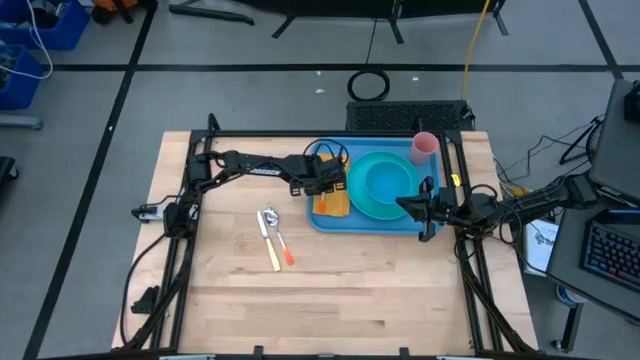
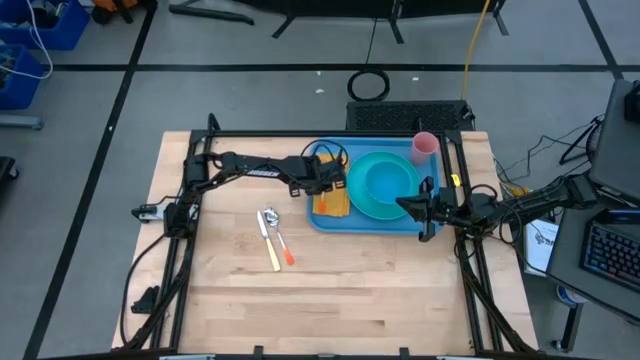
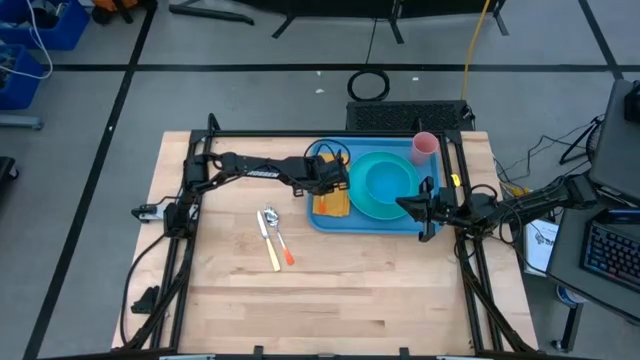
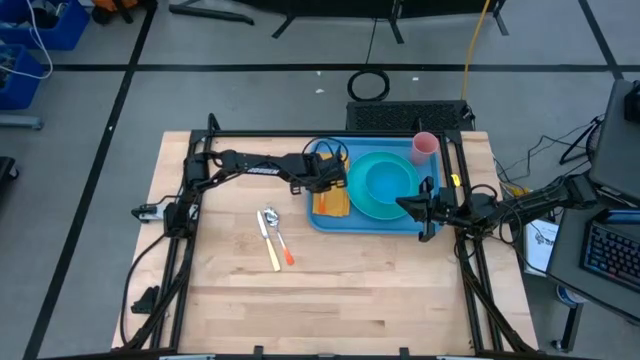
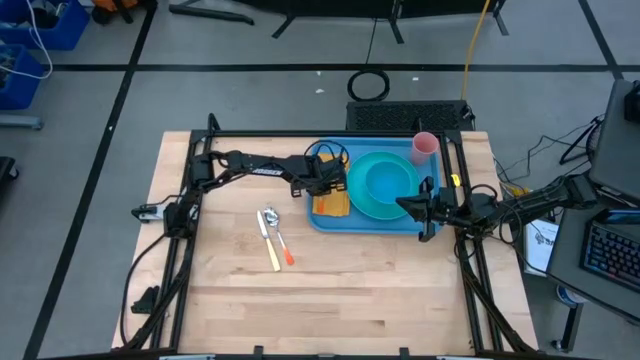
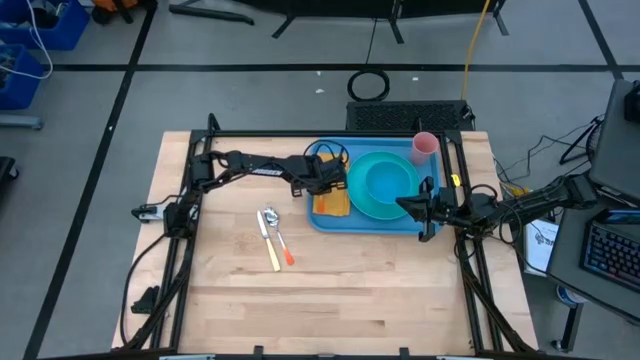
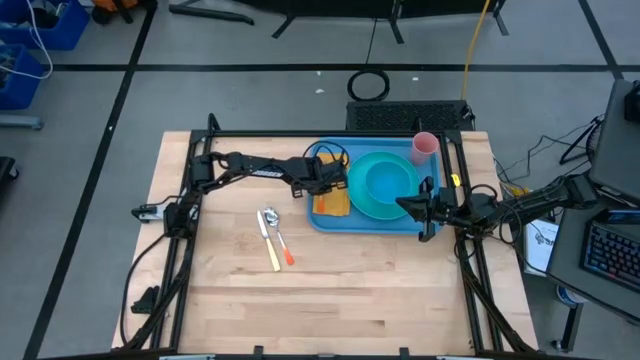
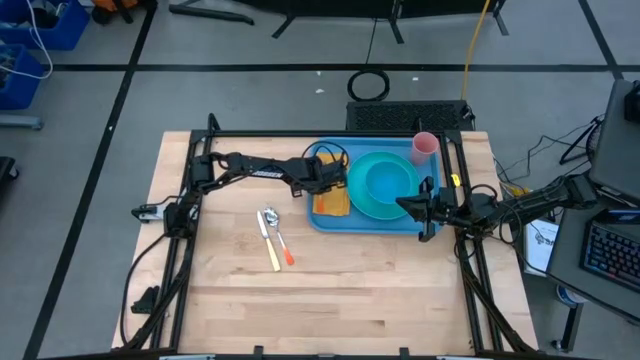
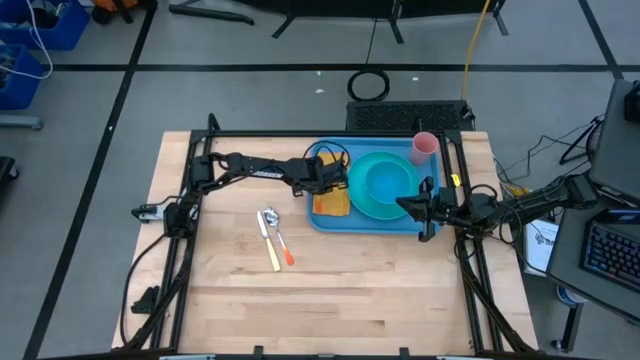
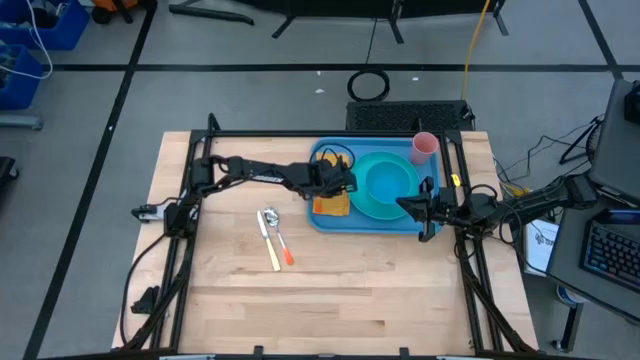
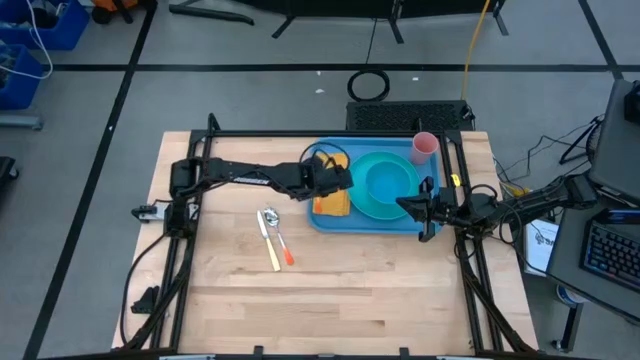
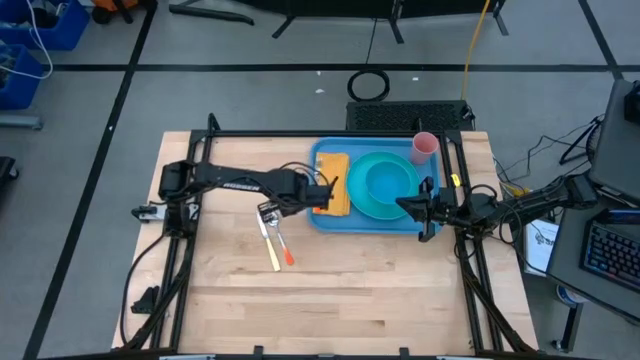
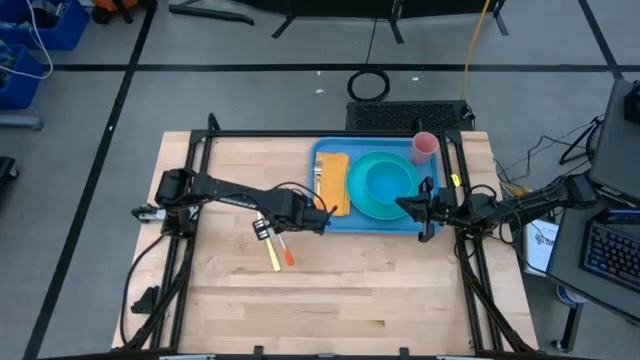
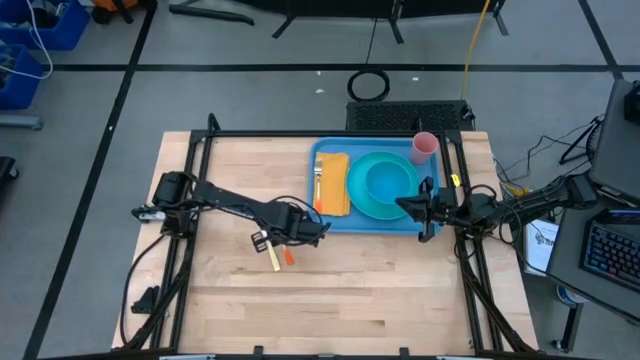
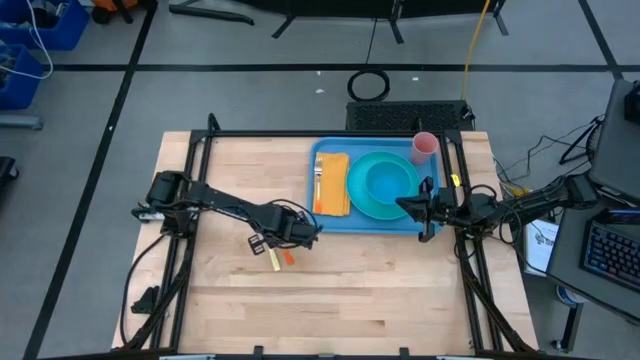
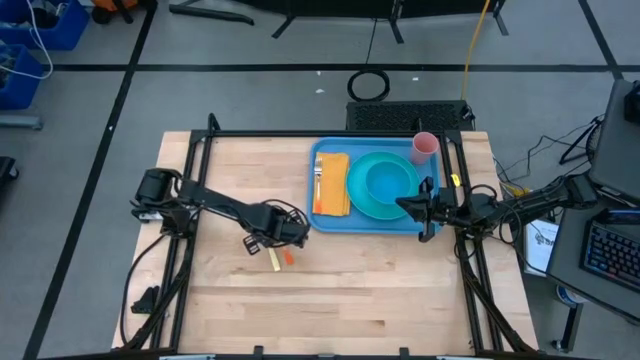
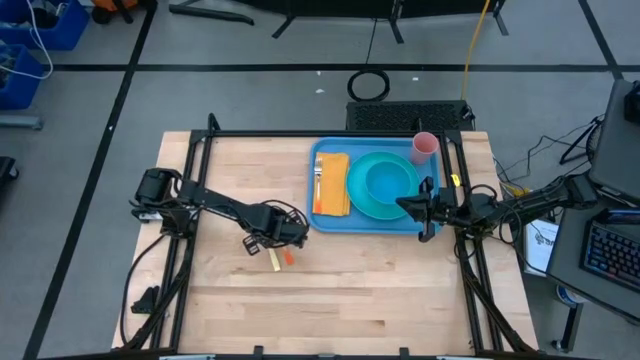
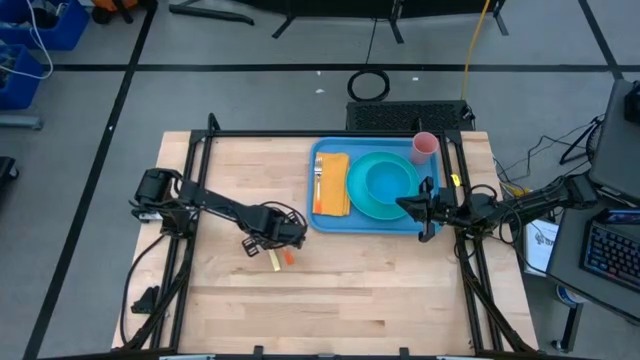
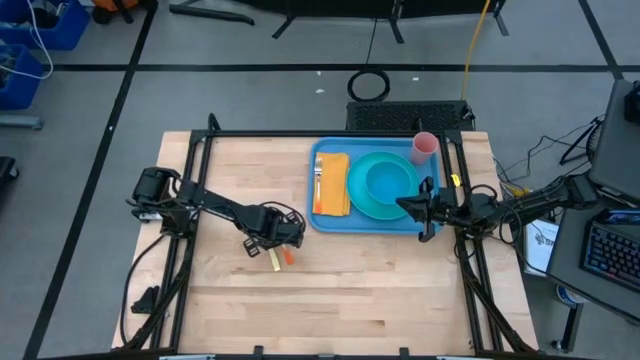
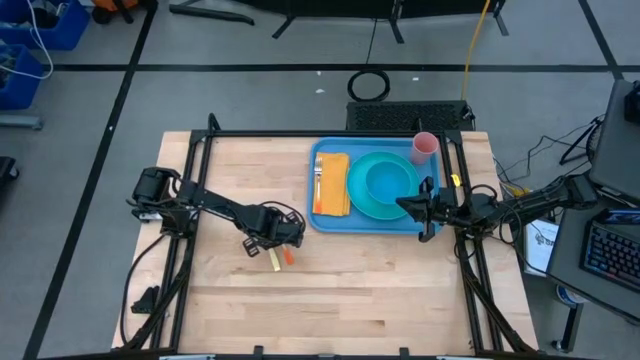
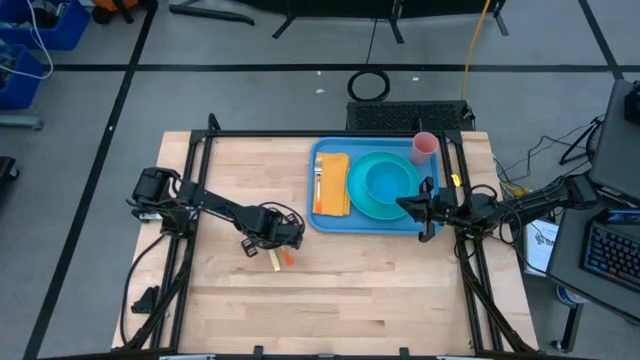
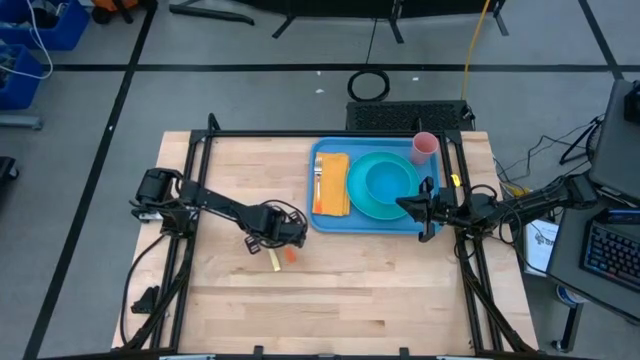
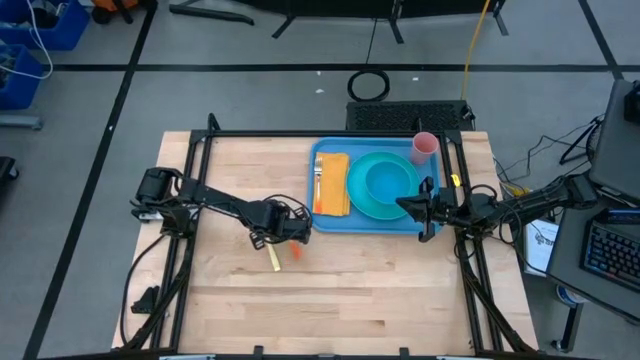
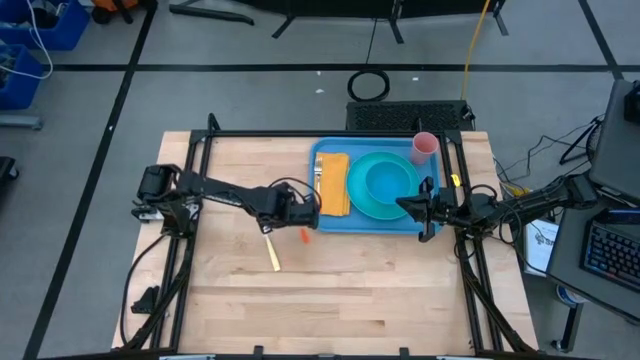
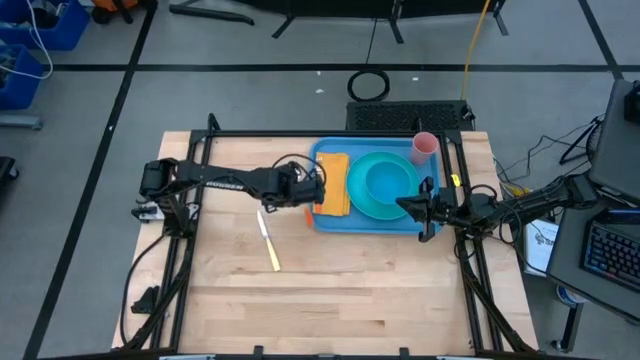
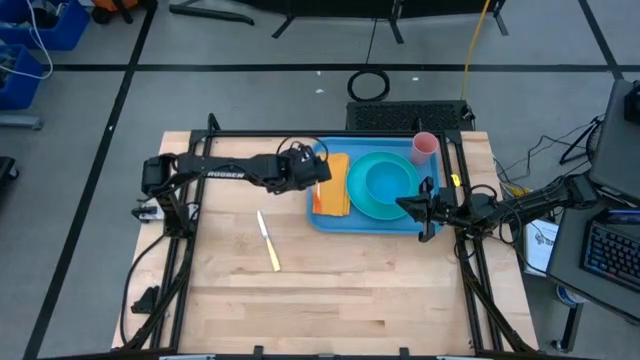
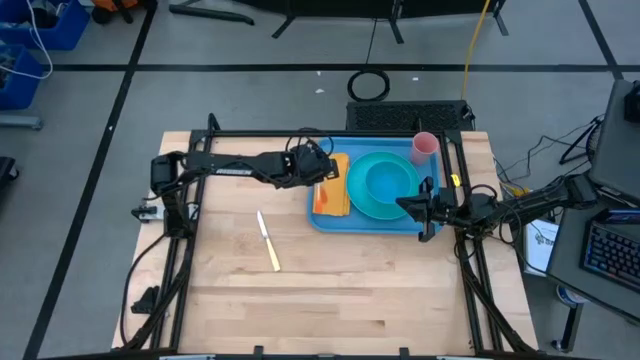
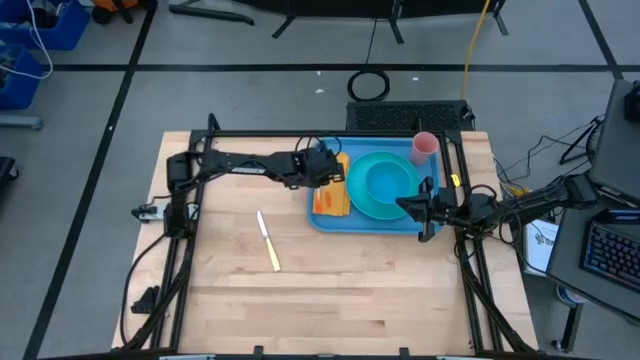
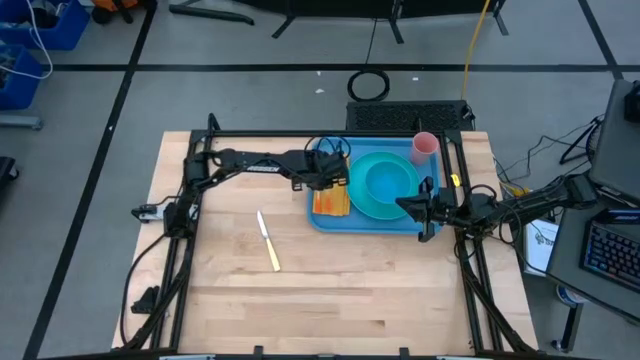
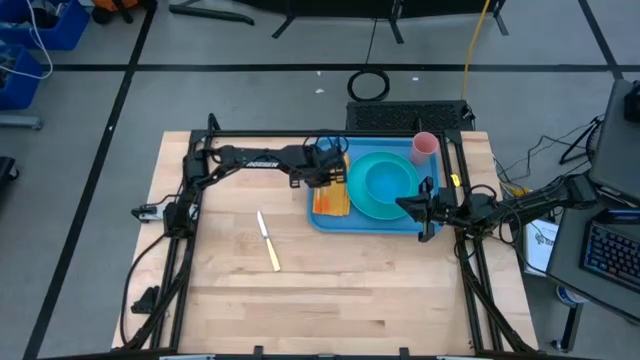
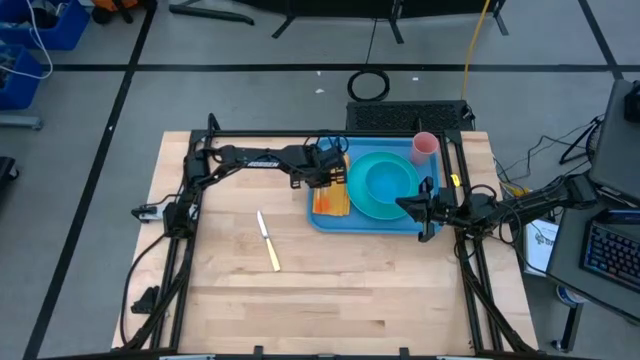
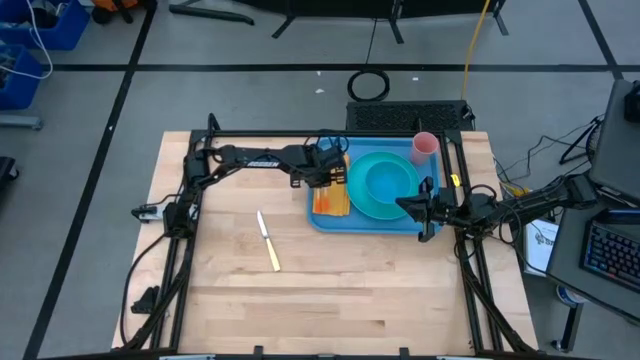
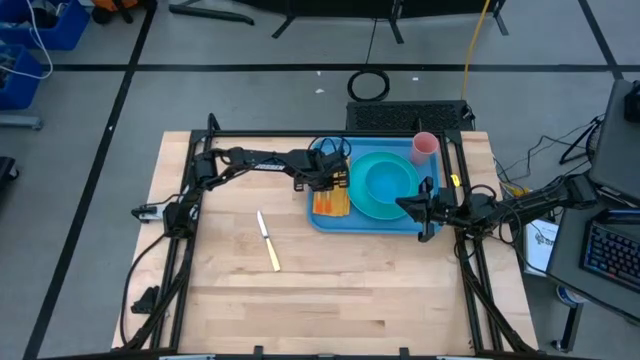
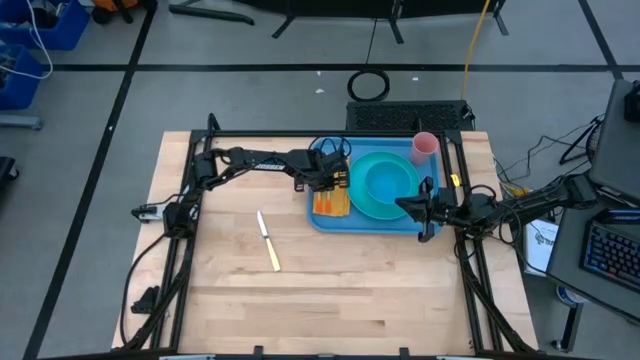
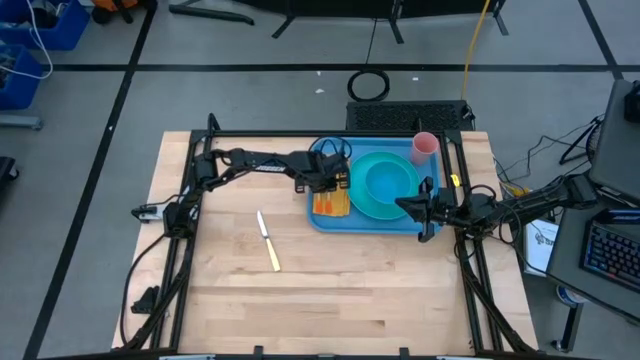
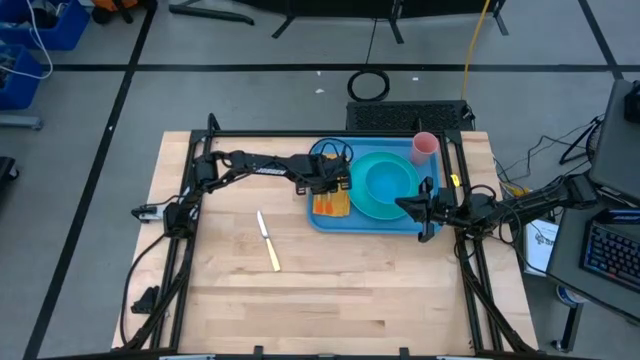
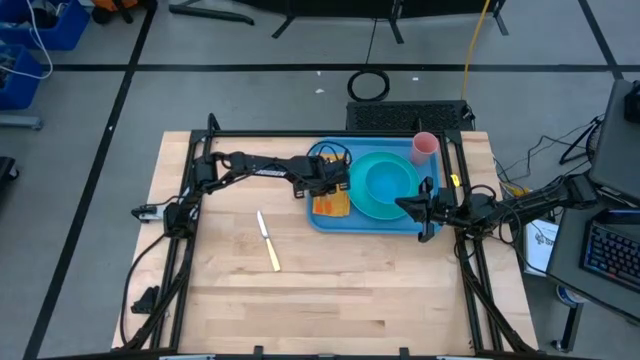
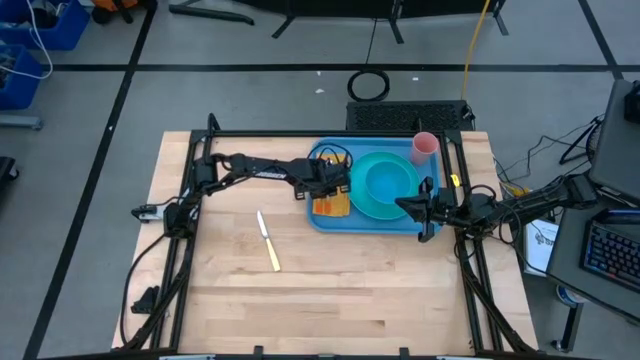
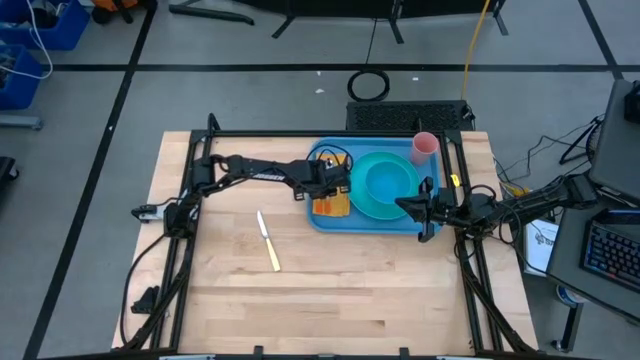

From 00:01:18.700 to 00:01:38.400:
Task: Set up tray
Put the silver spoon onto the blue tray

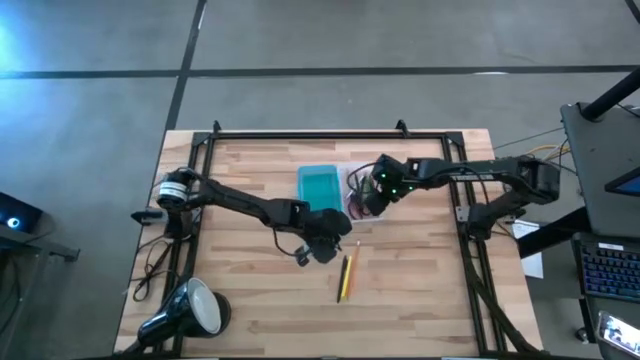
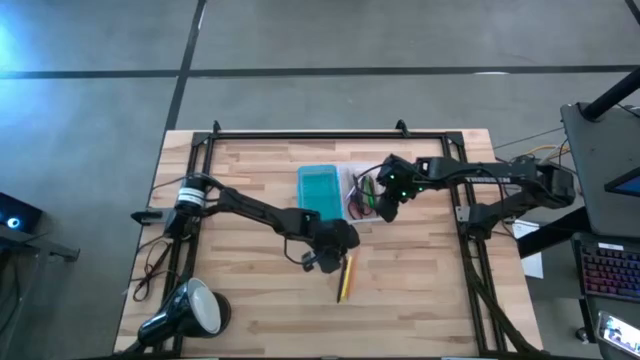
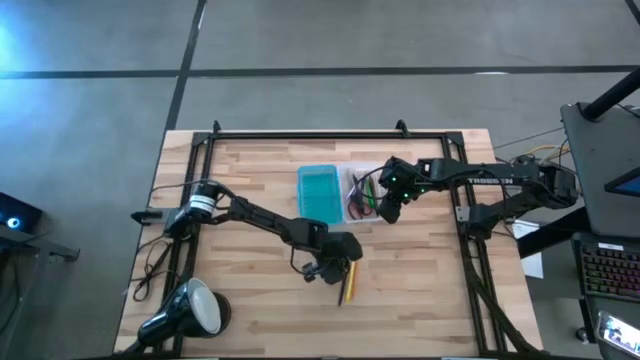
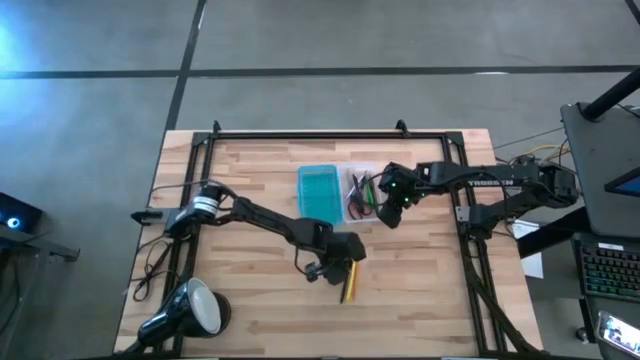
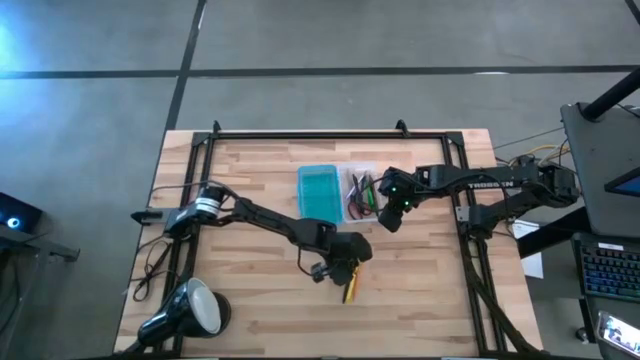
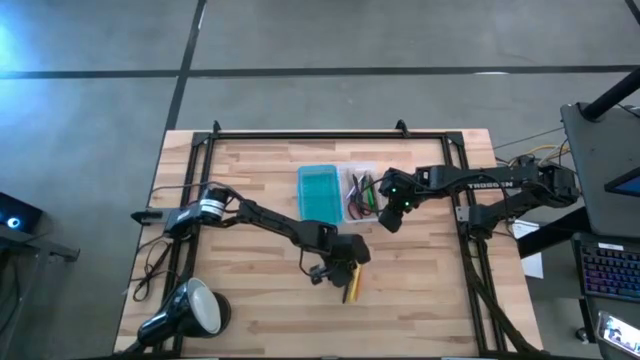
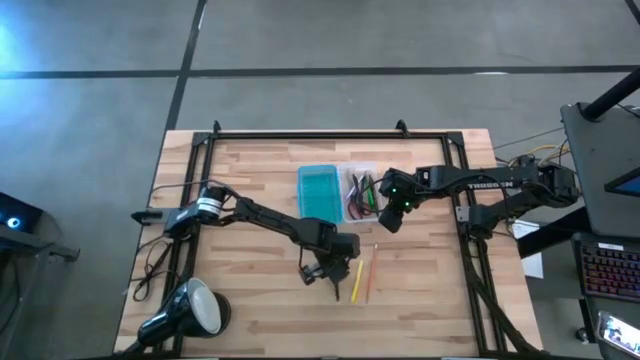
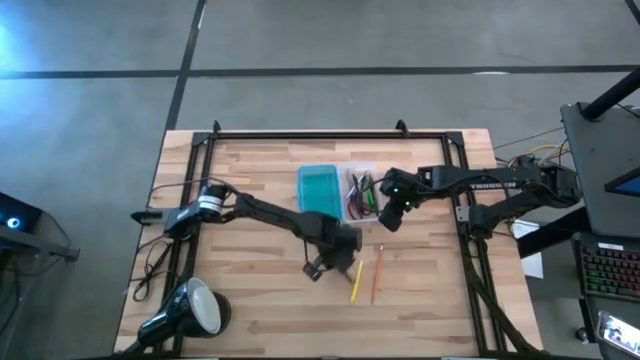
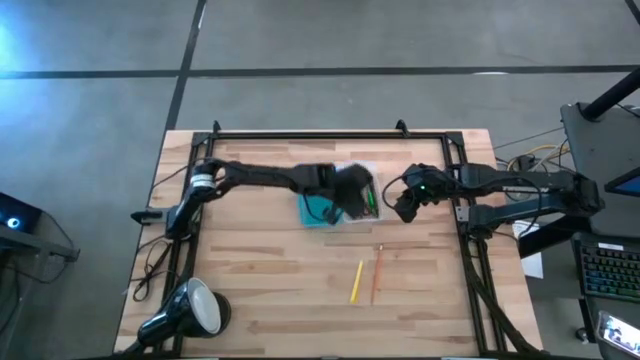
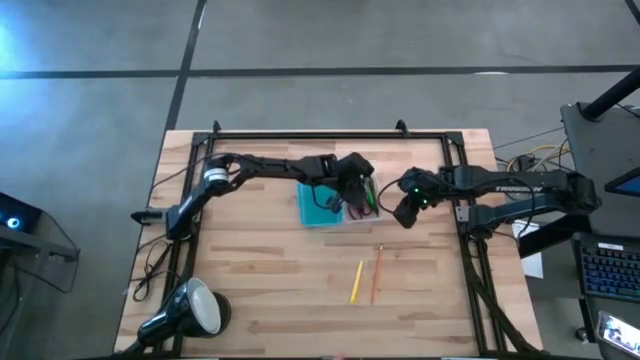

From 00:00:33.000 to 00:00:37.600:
Task: Pick & place school supplies into a supply box
Put the black pen into the blue supply box
